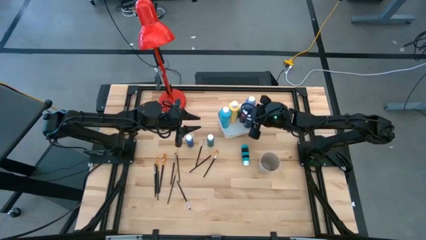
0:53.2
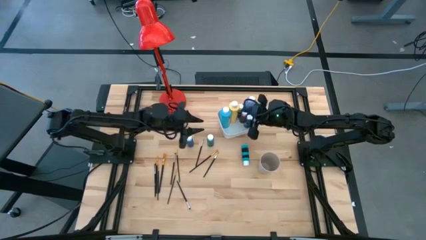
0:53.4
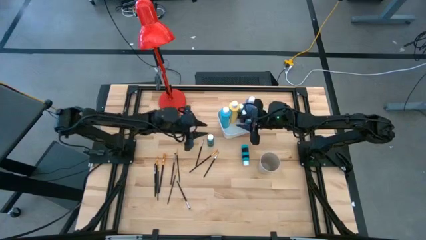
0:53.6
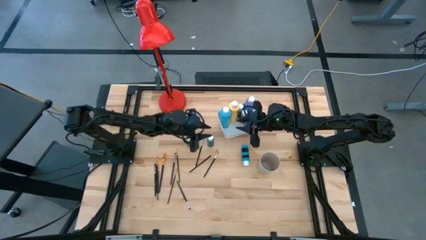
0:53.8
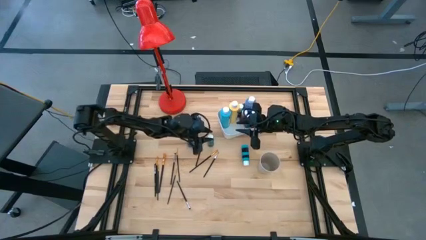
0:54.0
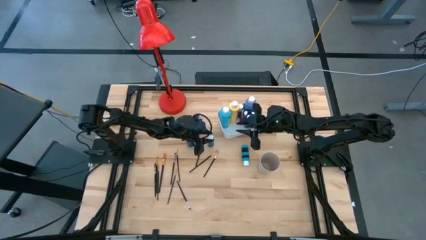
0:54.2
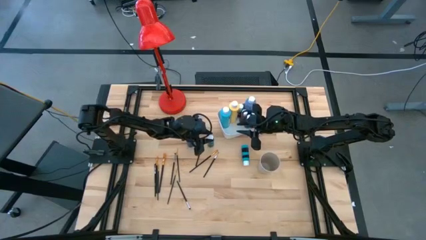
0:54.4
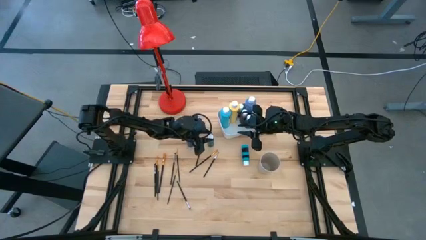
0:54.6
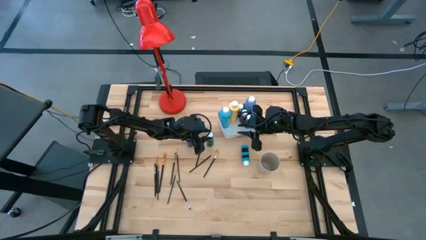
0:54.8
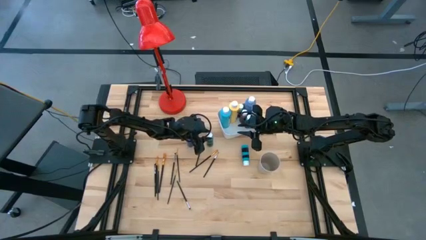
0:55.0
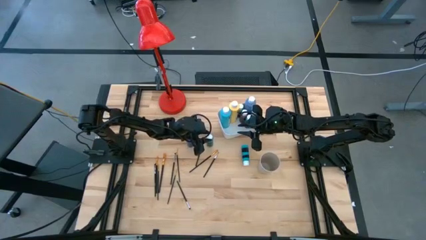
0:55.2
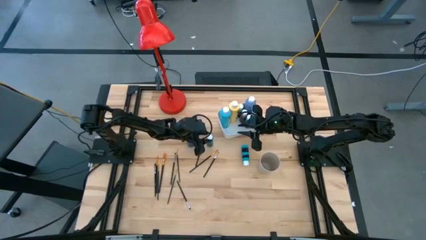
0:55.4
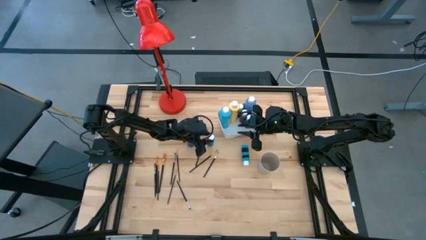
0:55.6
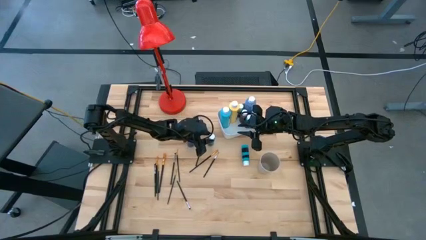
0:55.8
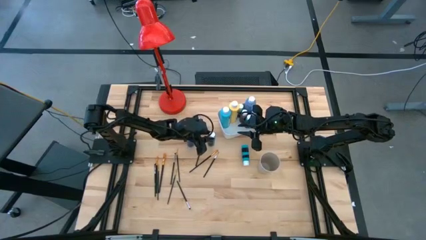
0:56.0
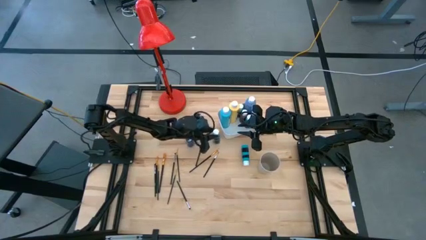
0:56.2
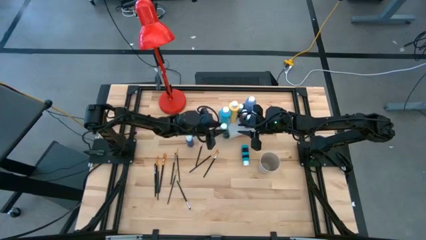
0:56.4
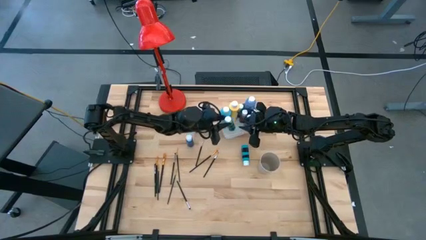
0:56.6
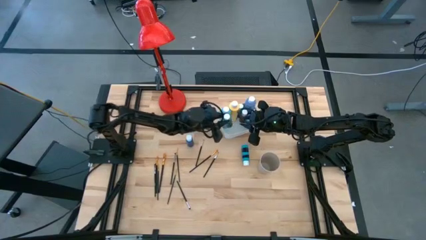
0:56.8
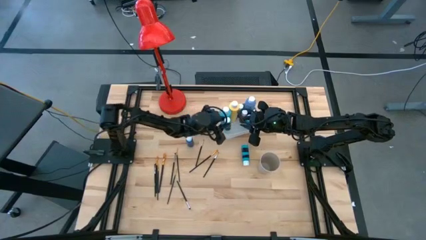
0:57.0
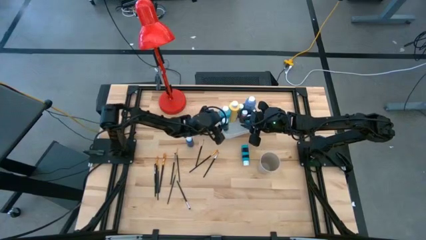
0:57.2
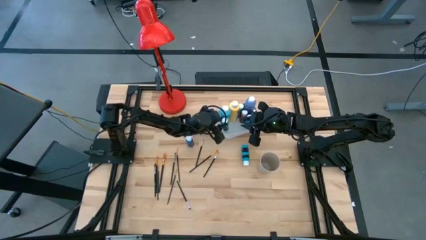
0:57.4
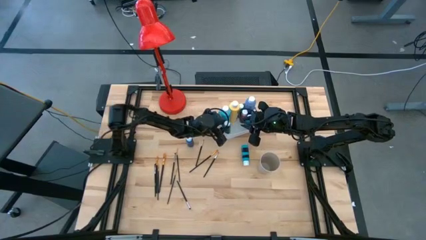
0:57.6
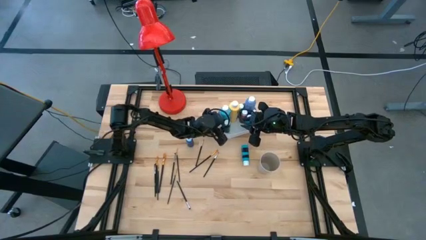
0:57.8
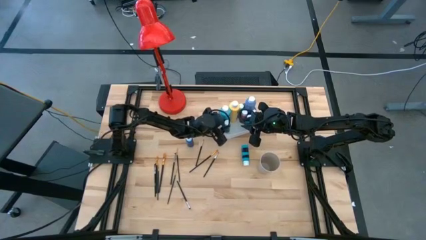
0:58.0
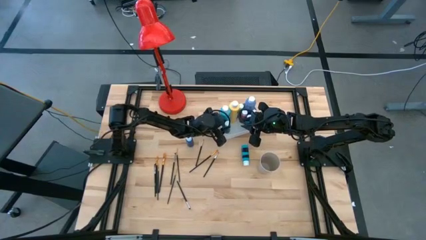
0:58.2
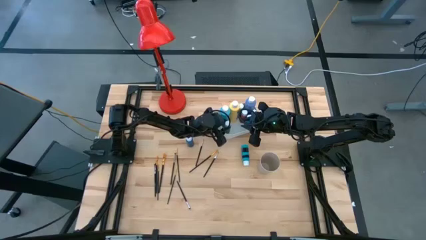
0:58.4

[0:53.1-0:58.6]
Task: Pick & Place Paint Supplies
Put the blue matte acrylic craft paint into the white bin

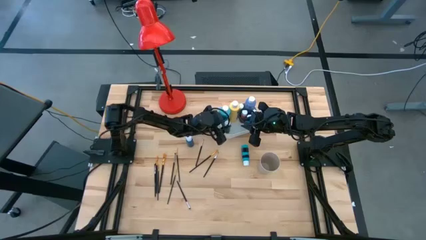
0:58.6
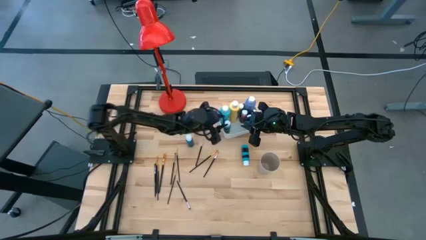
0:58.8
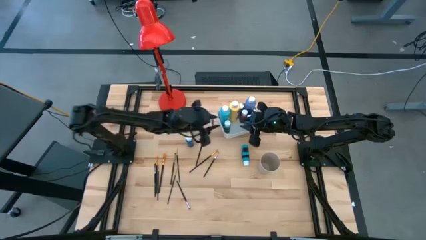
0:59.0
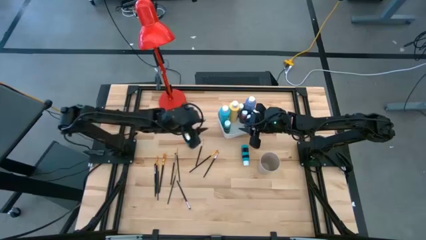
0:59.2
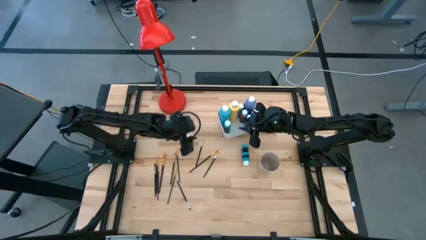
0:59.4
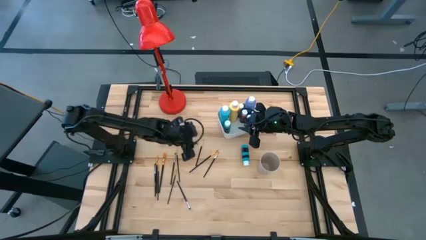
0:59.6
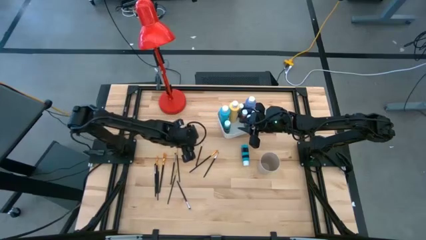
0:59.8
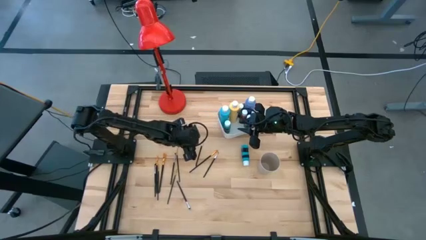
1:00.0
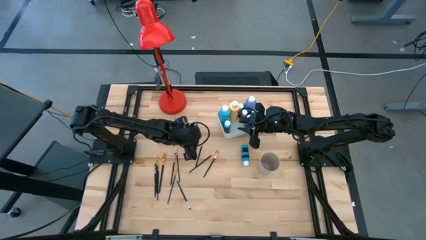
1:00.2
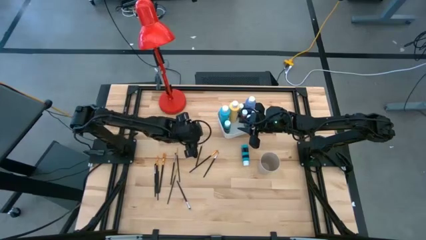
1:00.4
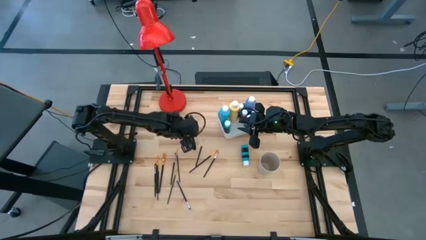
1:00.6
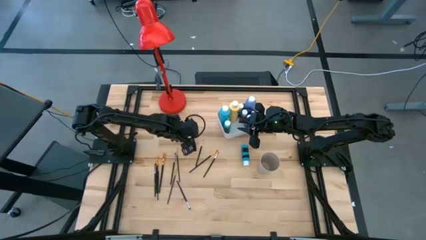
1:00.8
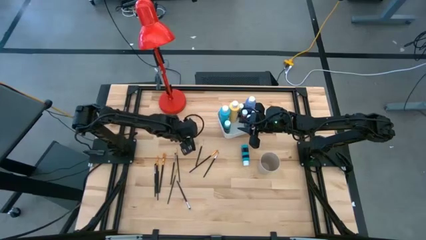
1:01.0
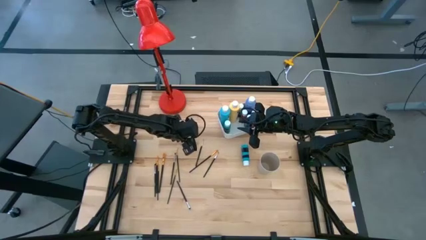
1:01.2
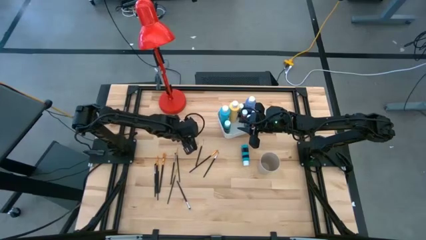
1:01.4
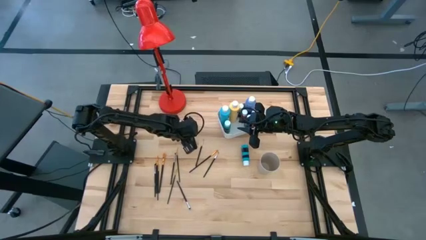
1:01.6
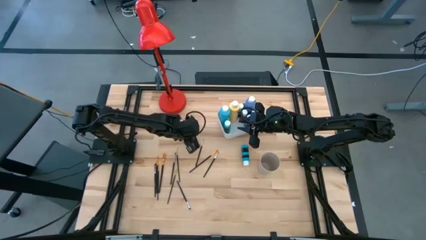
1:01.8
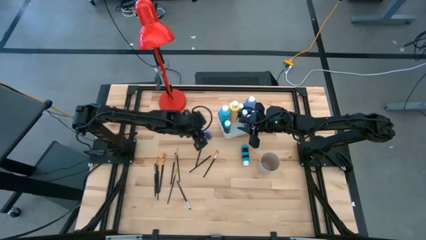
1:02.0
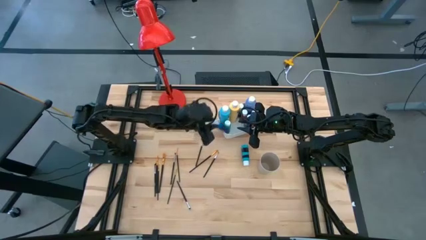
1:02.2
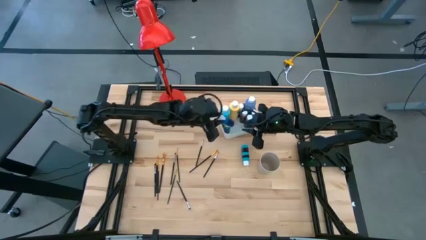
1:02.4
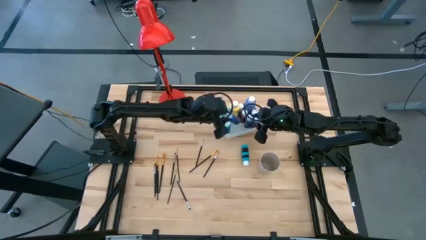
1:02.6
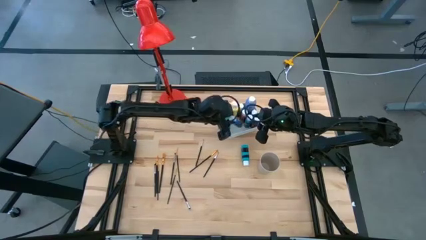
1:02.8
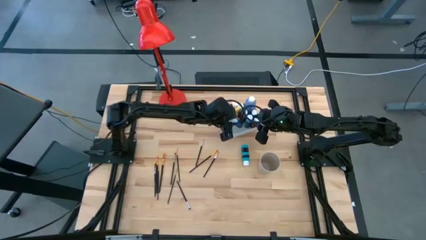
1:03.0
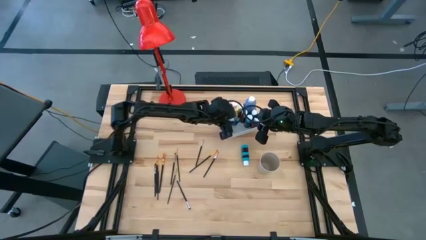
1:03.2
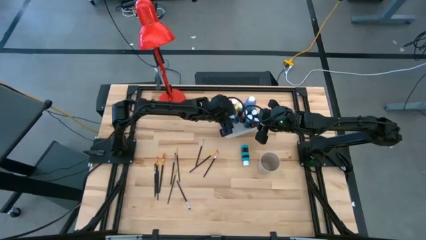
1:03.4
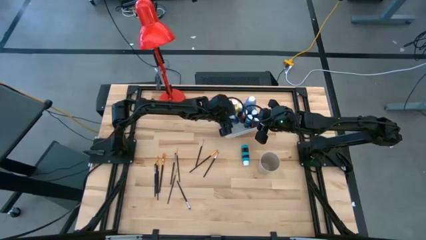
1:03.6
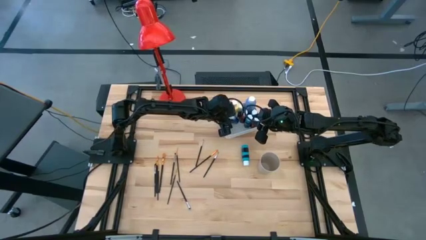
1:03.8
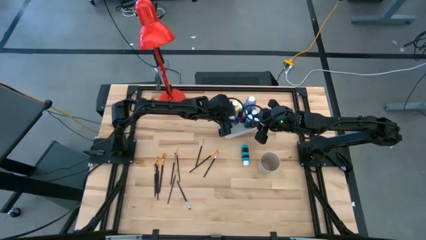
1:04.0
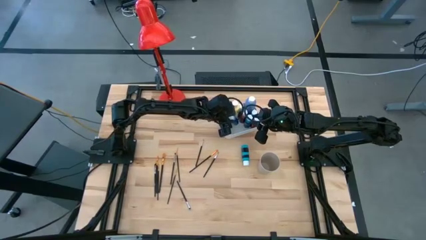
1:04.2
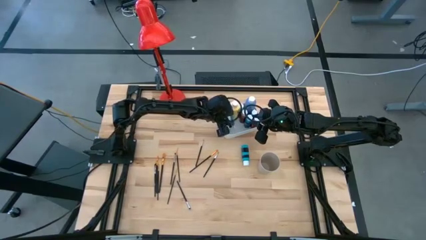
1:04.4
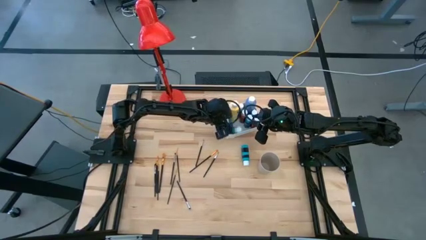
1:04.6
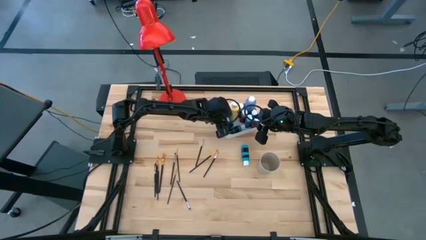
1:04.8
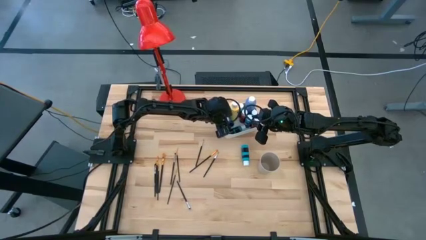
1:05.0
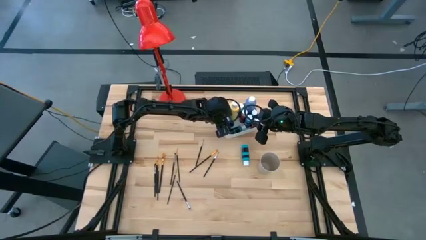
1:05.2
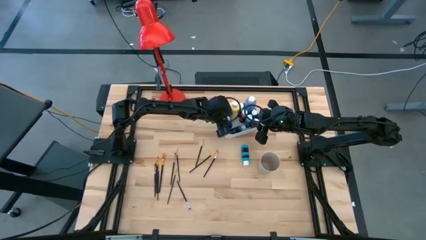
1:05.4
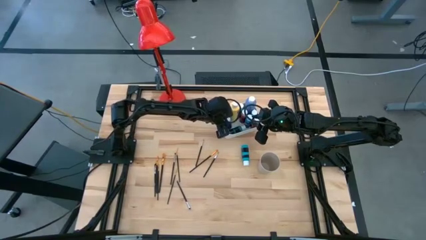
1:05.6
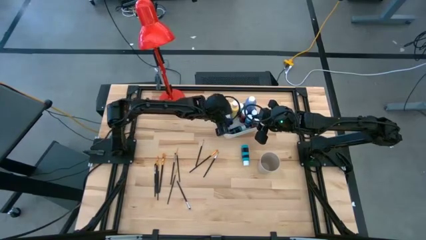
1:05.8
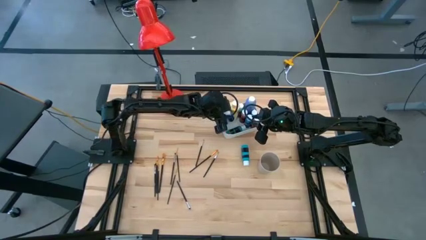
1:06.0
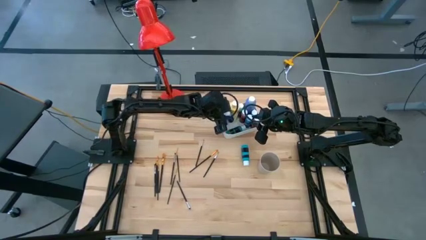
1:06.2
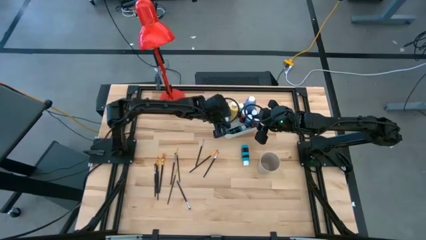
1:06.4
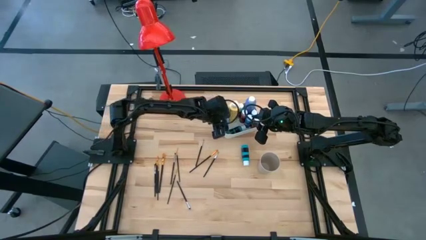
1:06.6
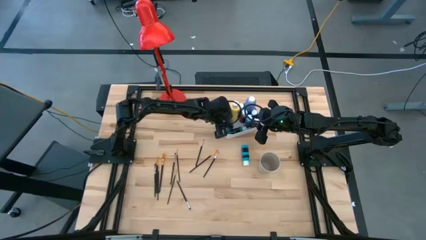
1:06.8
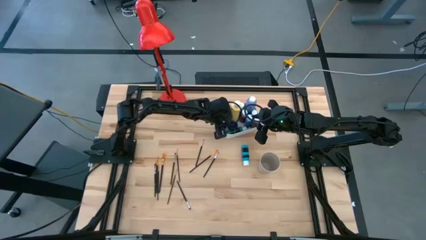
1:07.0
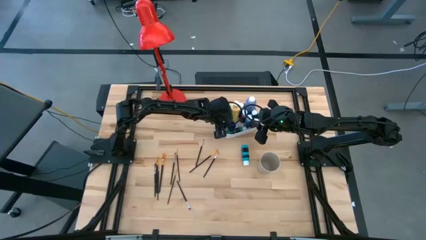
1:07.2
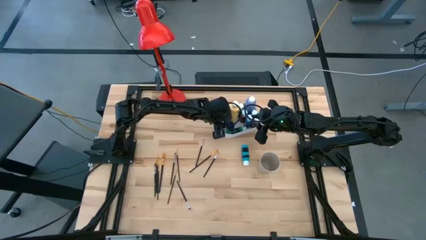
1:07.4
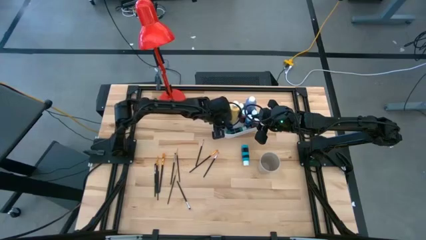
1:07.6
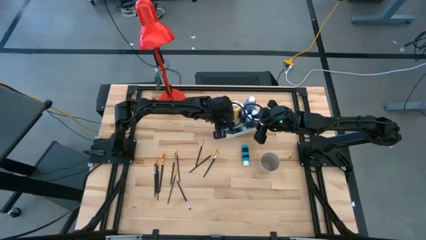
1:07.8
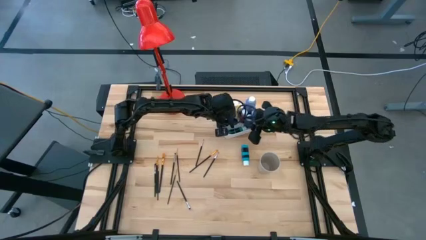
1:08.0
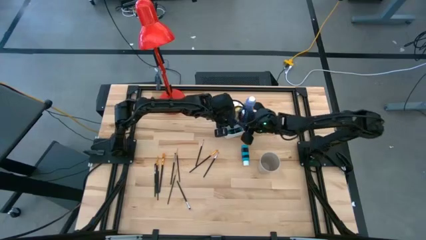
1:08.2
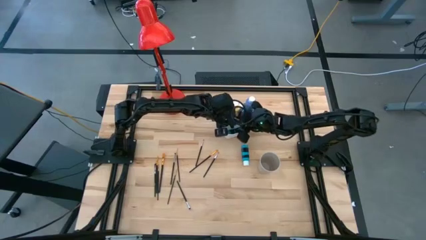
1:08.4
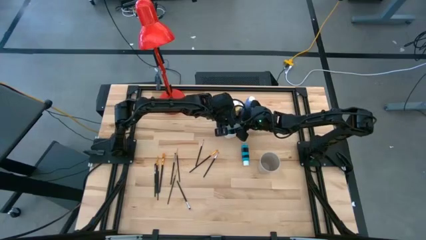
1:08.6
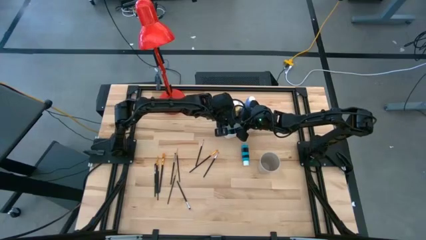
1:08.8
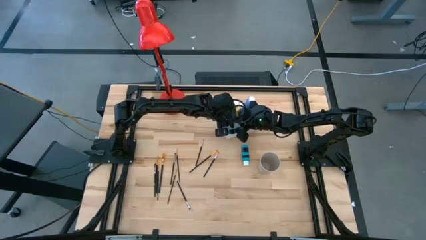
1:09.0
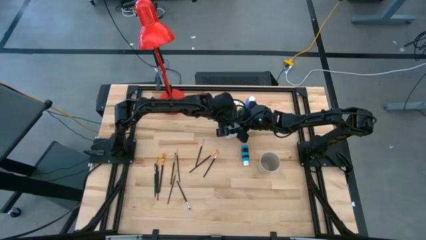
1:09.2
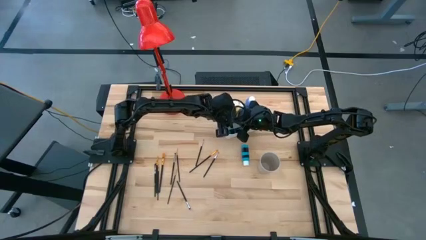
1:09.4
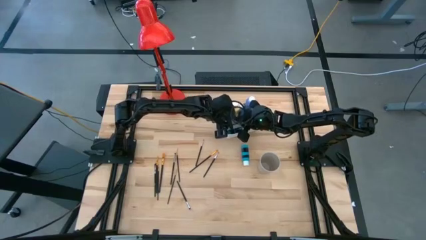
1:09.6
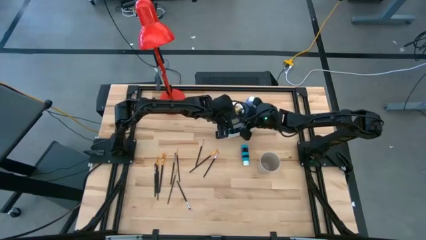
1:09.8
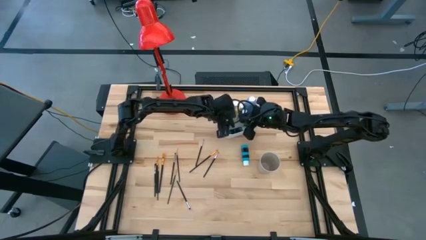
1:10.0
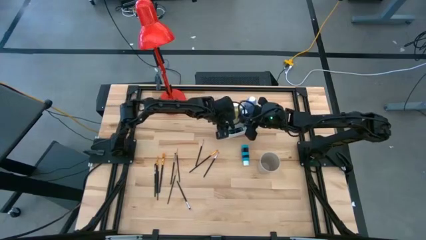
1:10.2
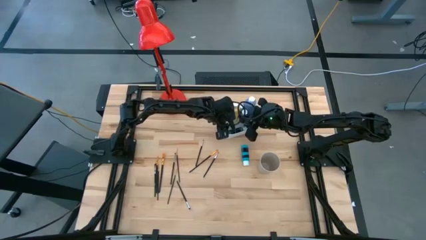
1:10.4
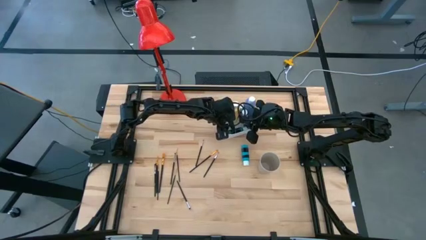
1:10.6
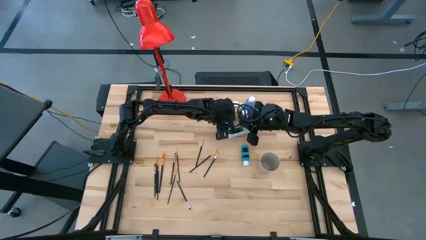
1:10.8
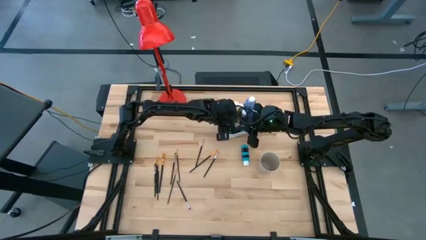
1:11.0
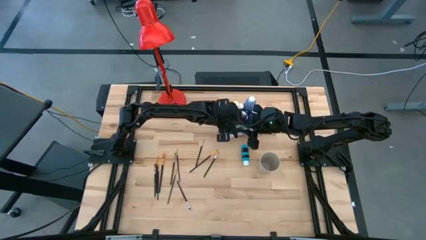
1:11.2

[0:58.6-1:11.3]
Put the blue matte acrylic craft paint into the white bin
